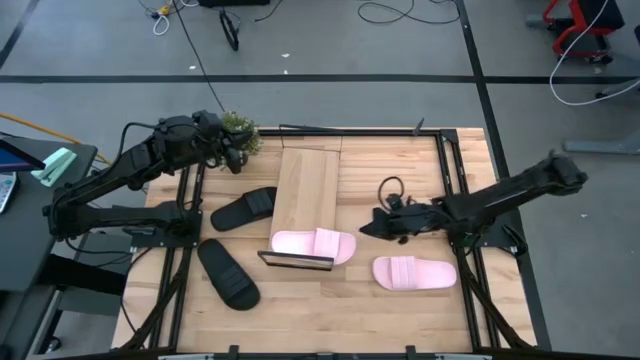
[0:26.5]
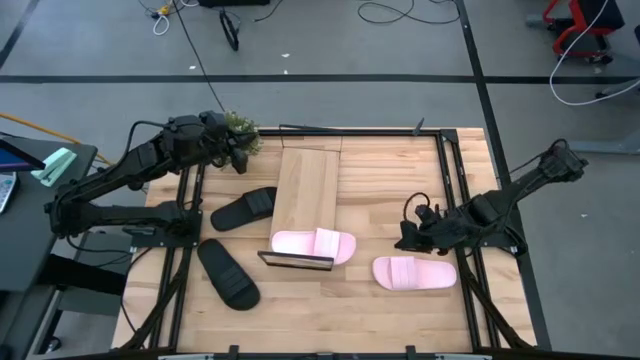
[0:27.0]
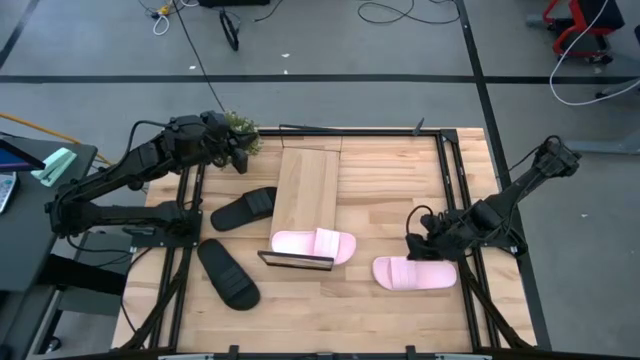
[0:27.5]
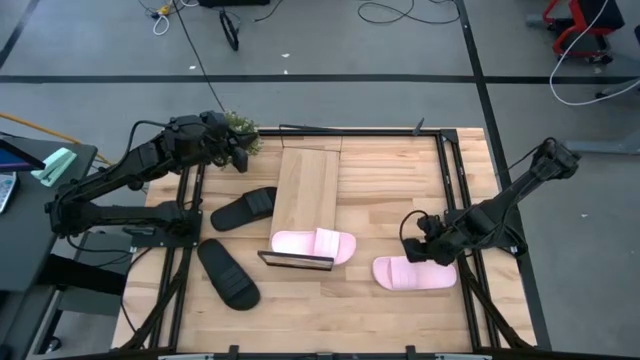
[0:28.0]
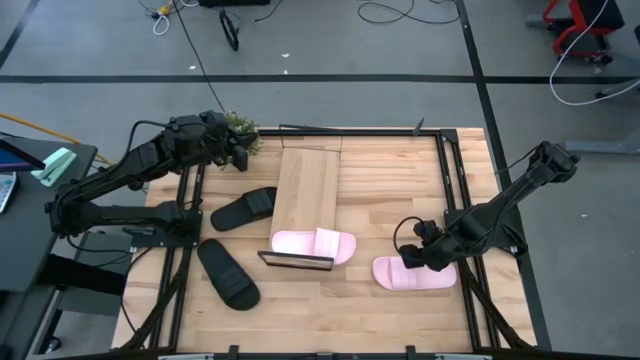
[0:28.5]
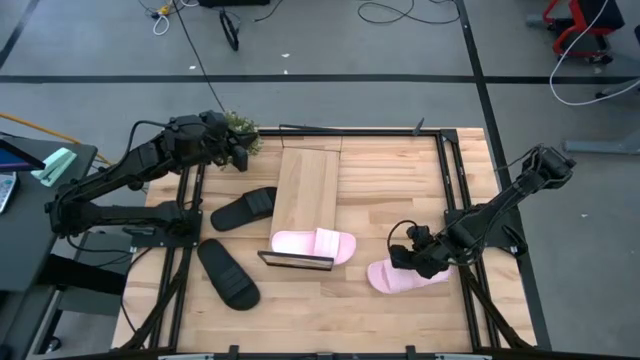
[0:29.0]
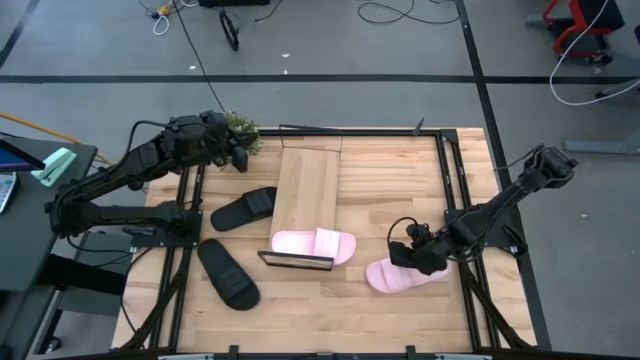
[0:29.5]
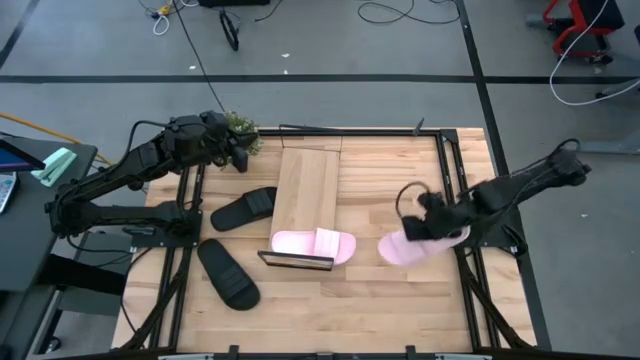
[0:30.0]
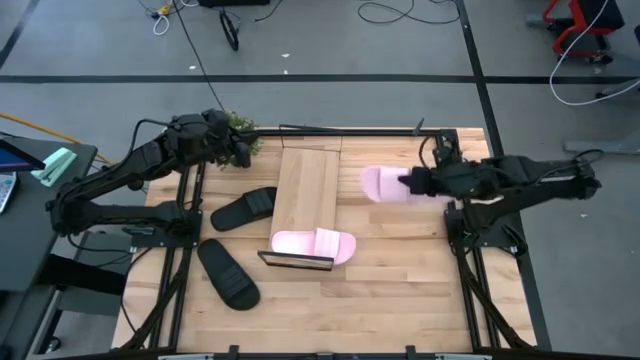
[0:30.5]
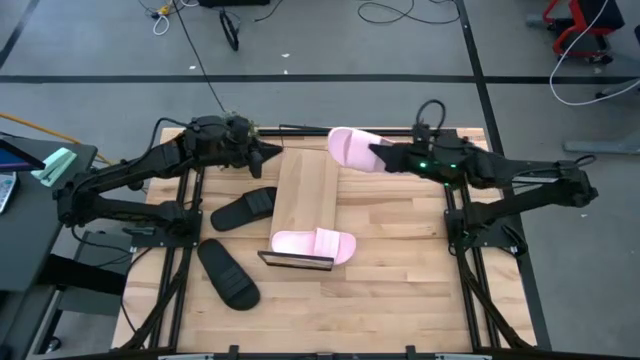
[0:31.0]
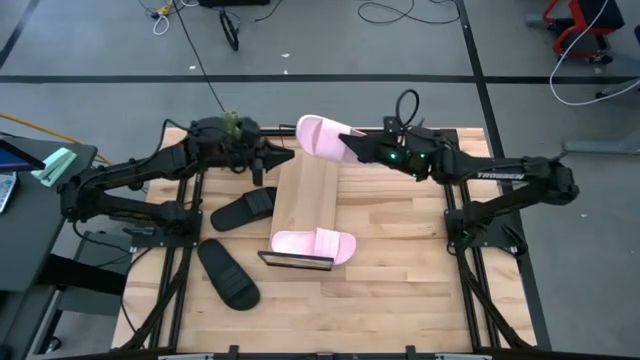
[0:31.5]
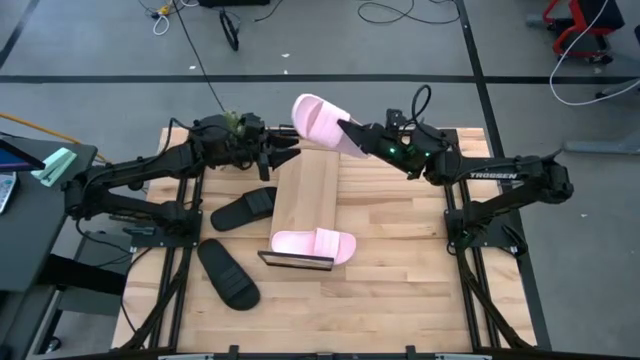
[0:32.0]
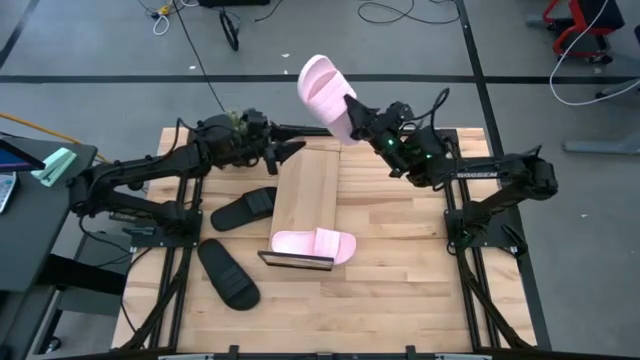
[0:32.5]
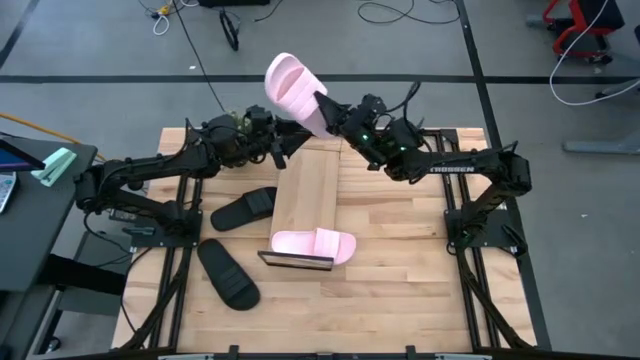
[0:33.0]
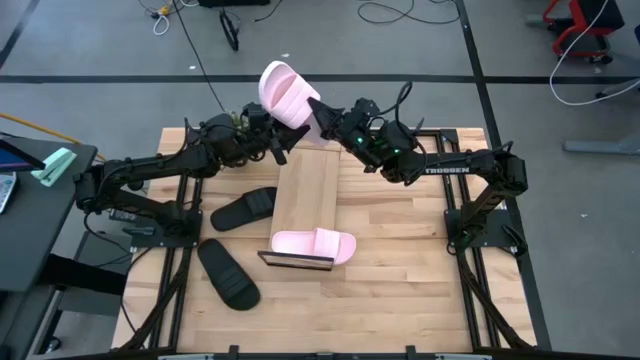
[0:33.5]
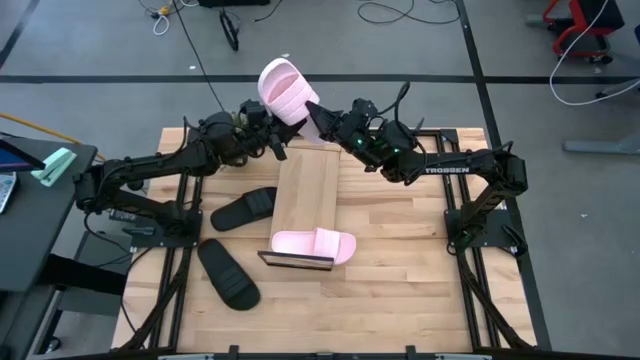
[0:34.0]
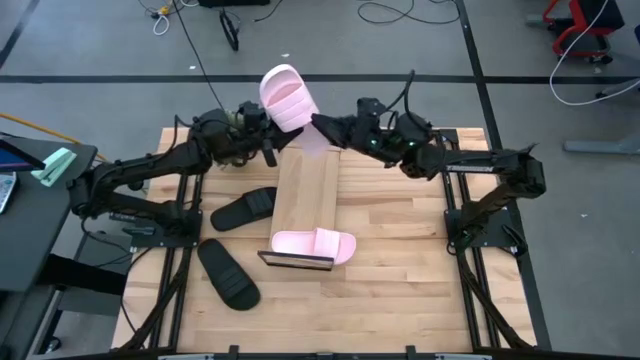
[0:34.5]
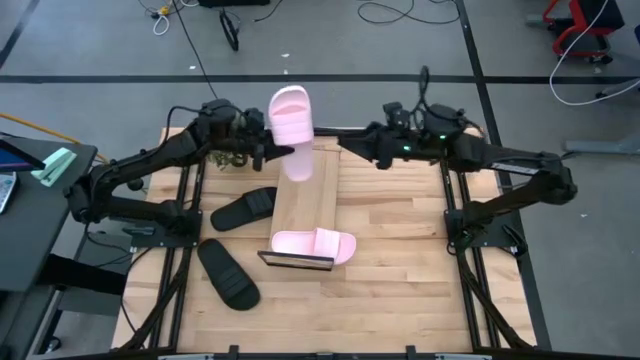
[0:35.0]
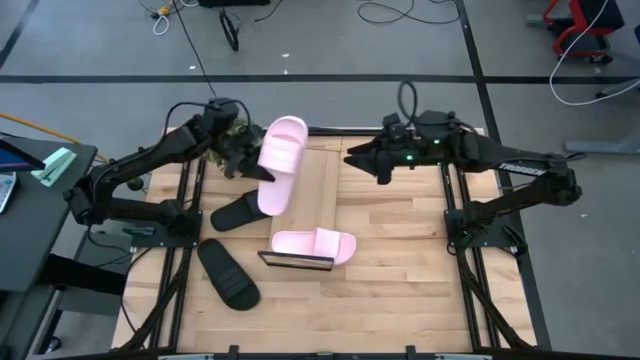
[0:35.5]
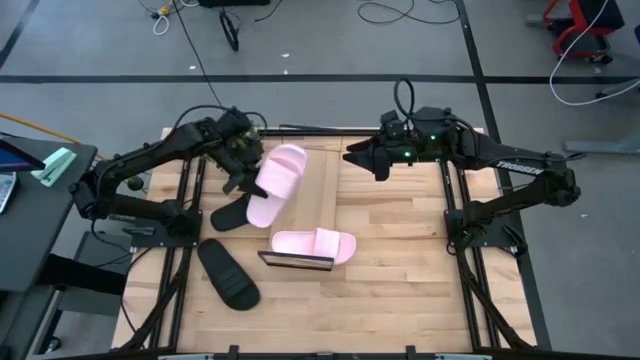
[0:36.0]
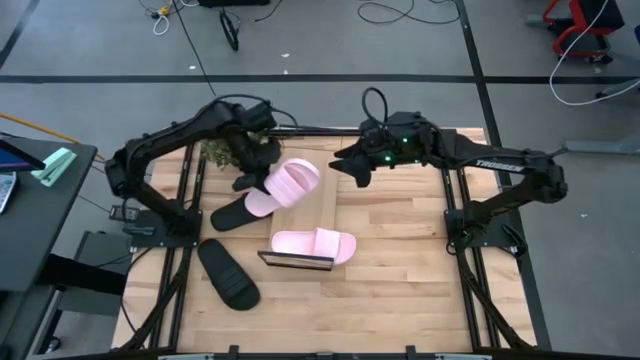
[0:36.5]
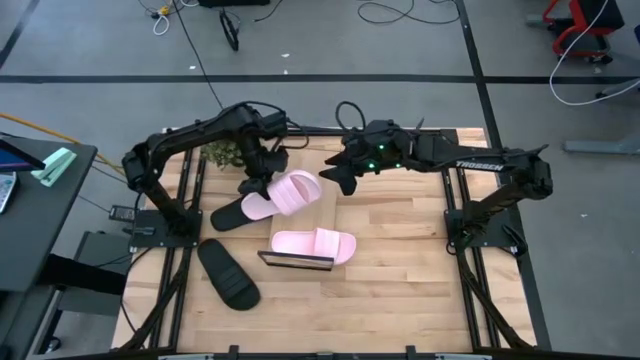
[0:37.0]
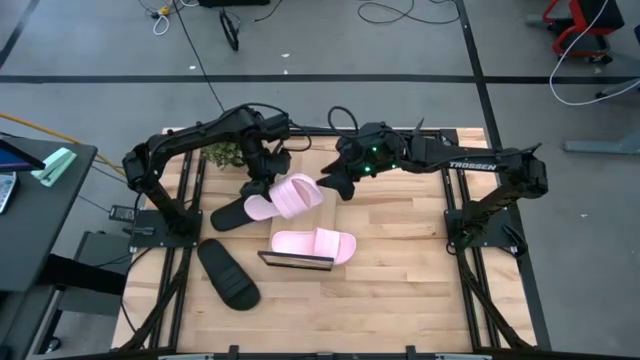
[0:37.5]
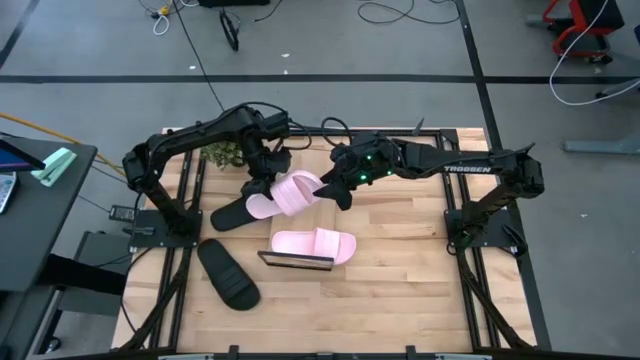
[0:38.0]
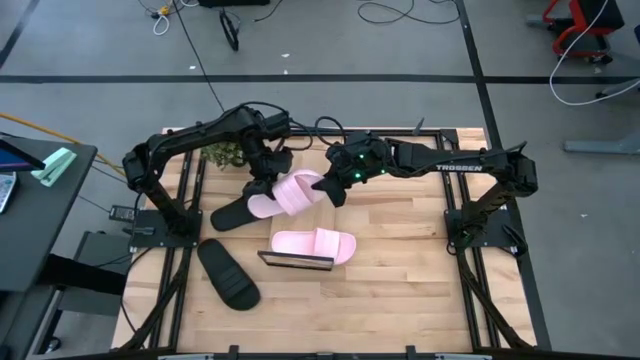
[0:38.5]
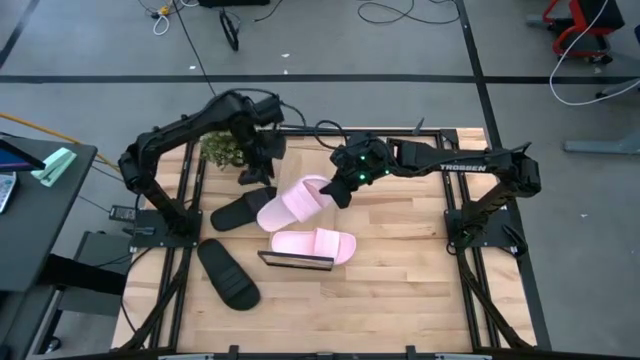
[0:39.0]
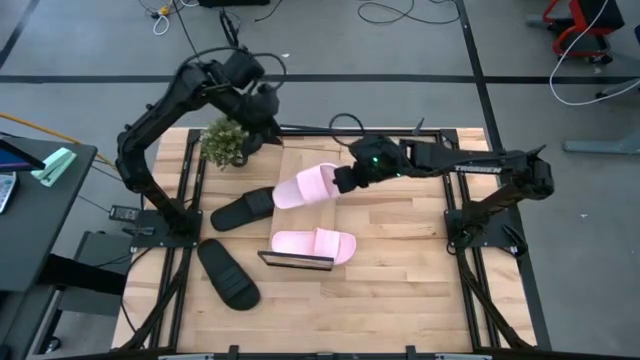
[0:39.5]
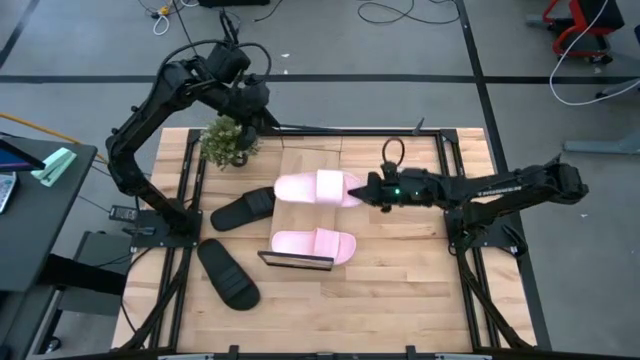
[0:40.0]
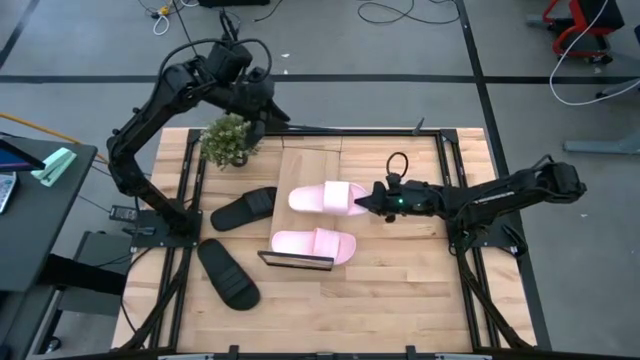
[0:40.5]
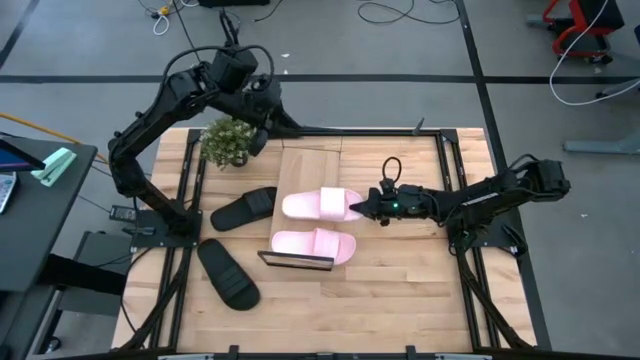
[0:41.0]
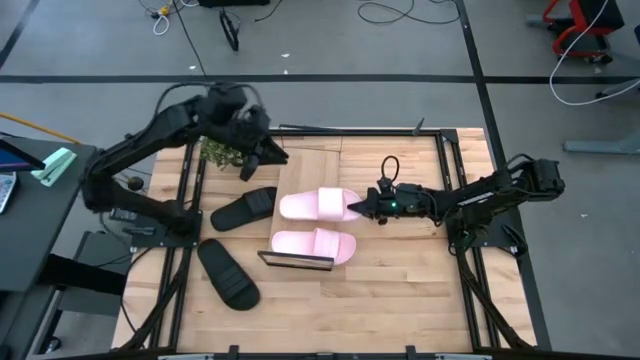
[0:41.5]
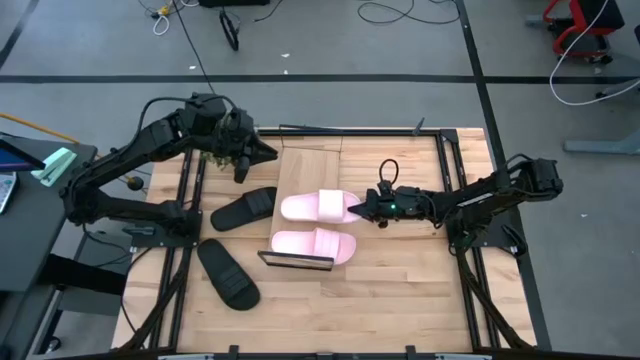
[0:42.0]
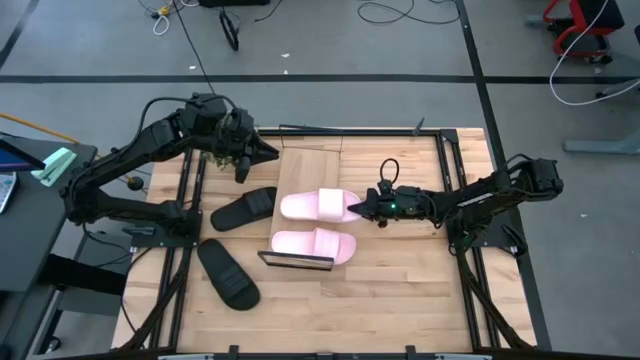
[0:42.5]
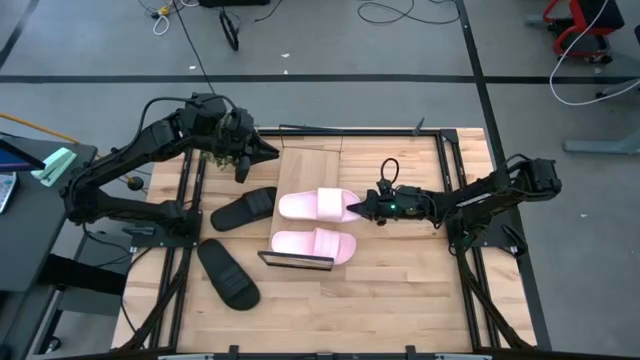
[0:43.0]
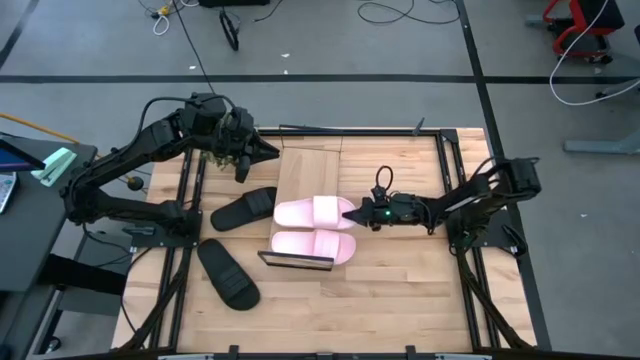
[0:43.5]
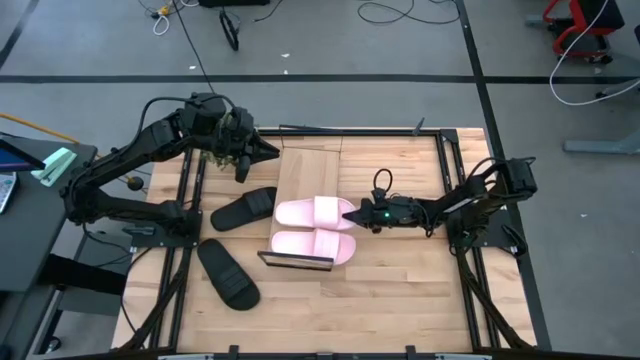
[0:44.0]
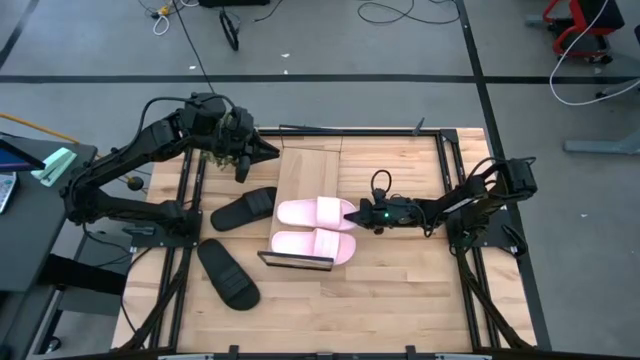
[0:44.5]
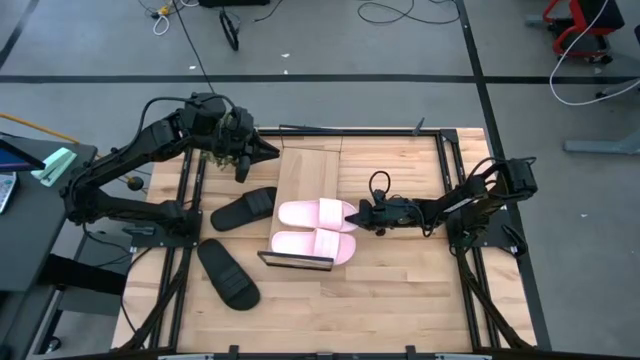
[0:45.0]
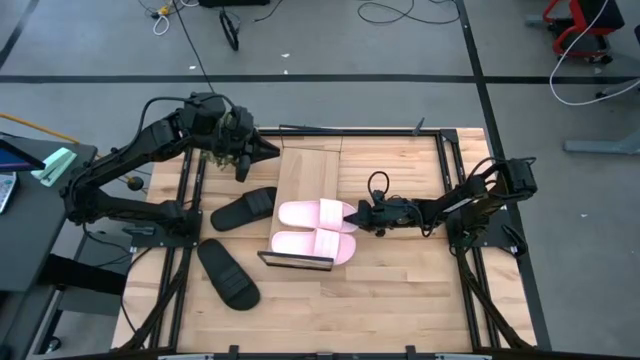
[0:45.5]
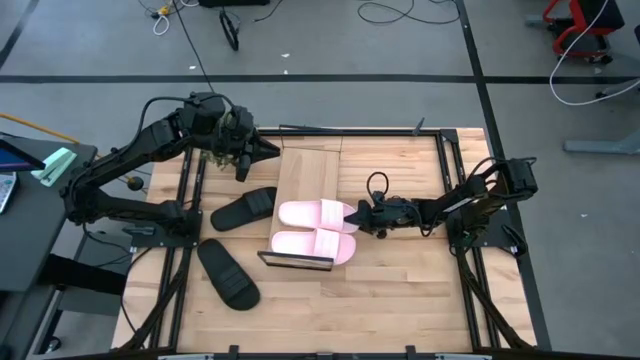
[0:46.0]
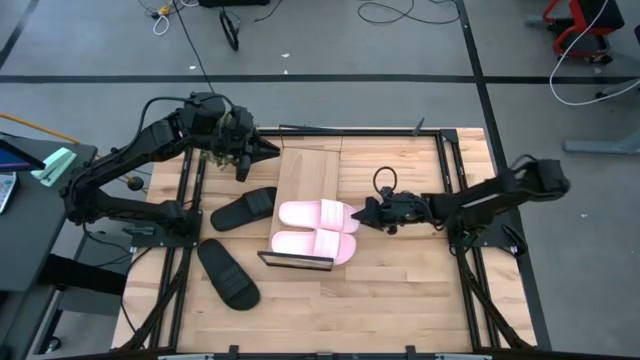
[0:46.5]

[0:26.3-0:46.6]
Task: Pick and place slides into the shelf
Put the pink slide on the shelf
